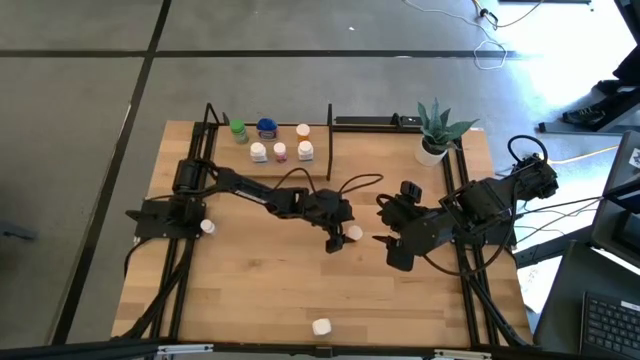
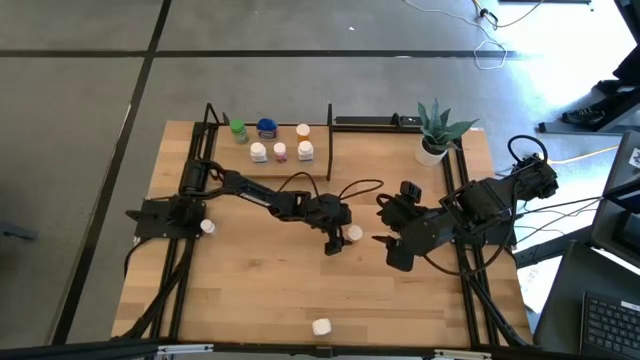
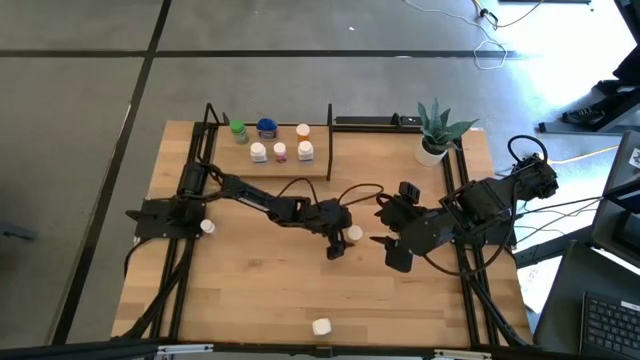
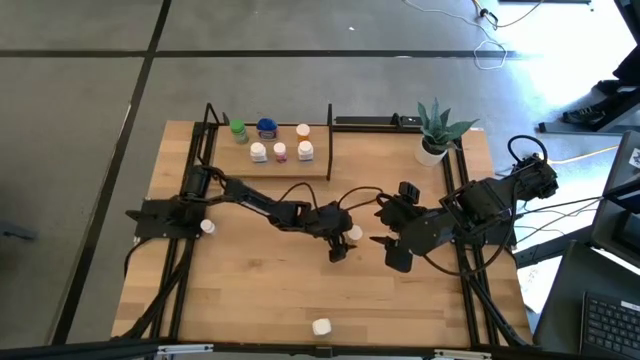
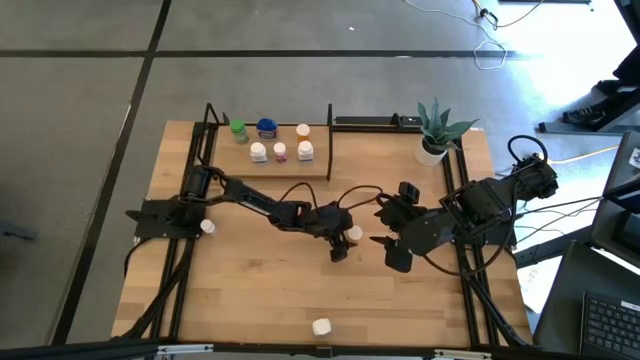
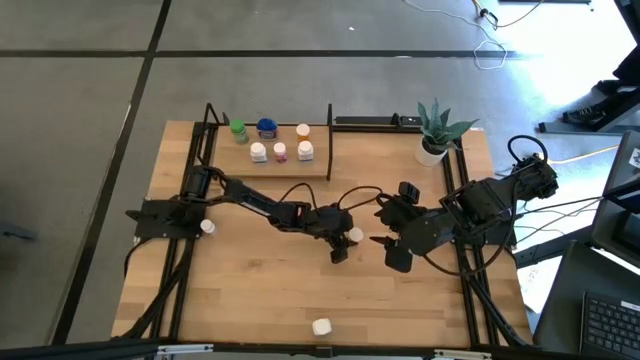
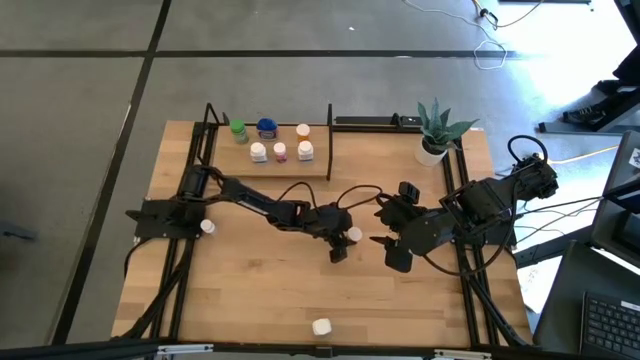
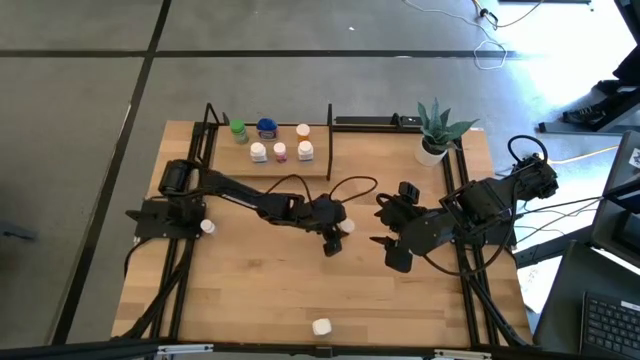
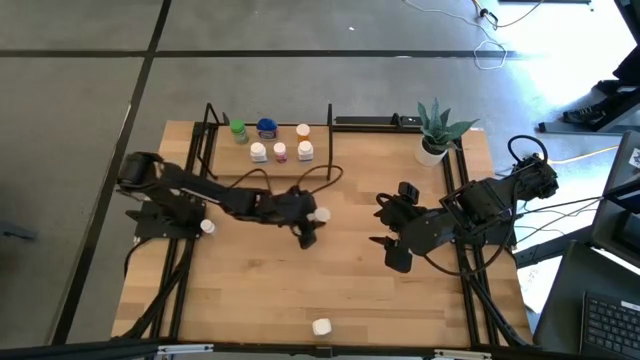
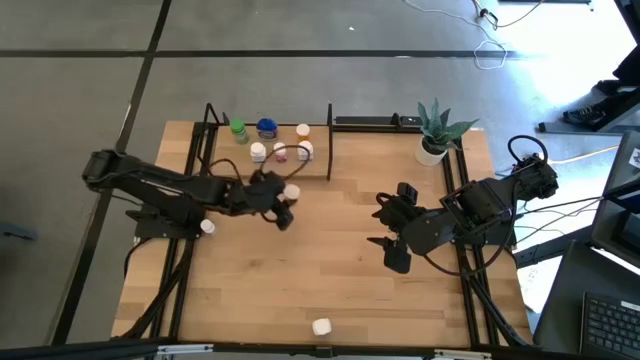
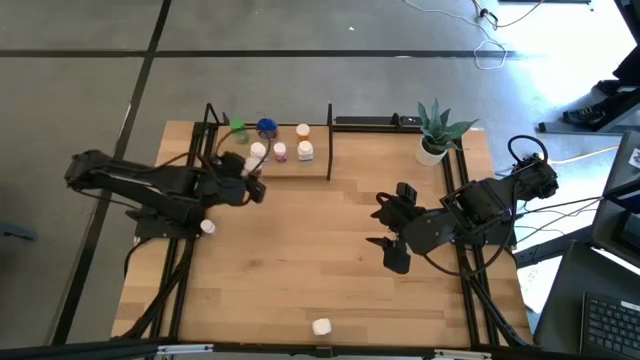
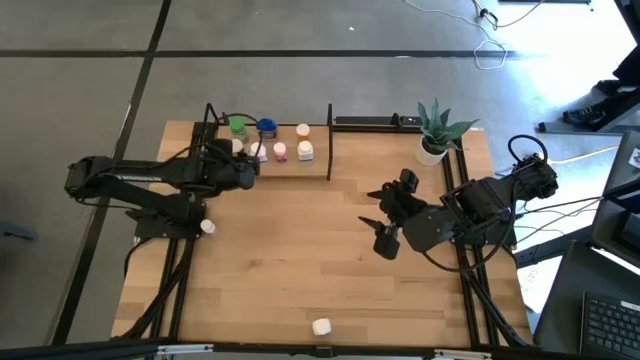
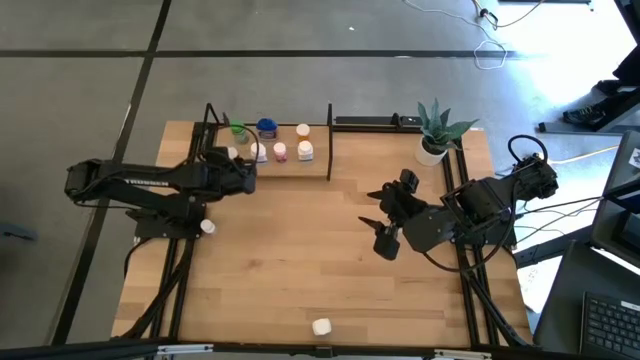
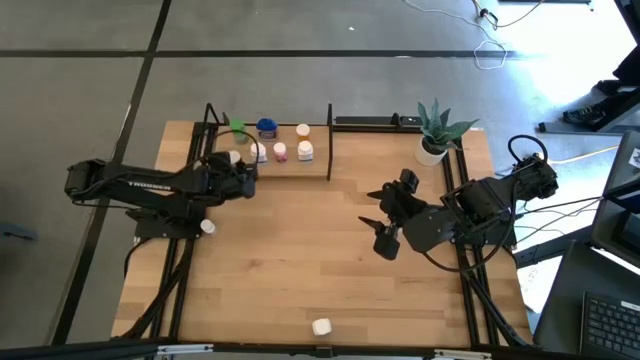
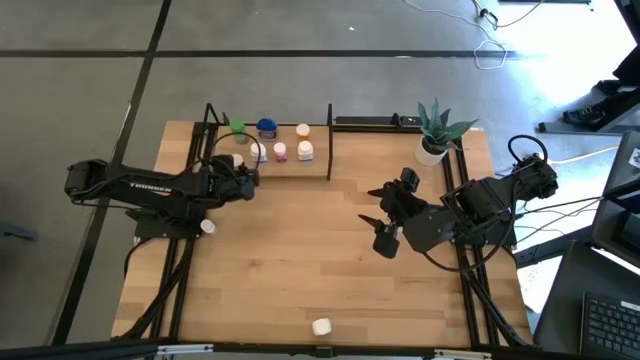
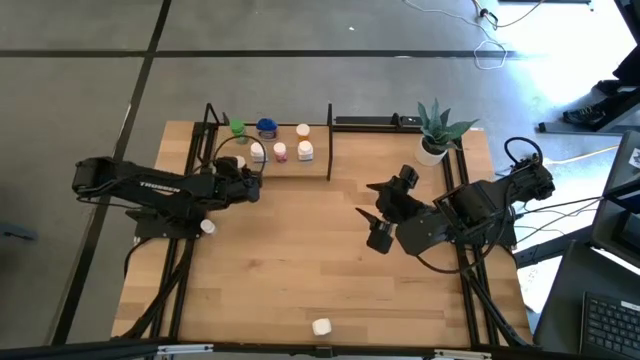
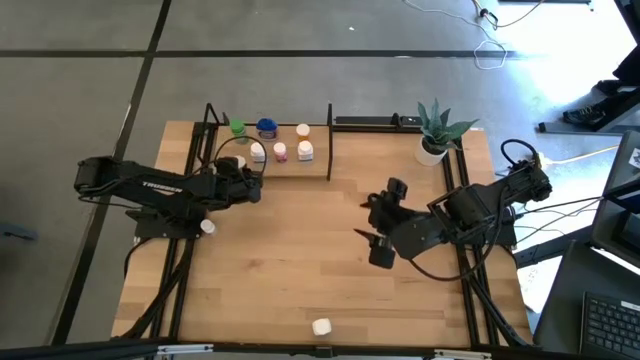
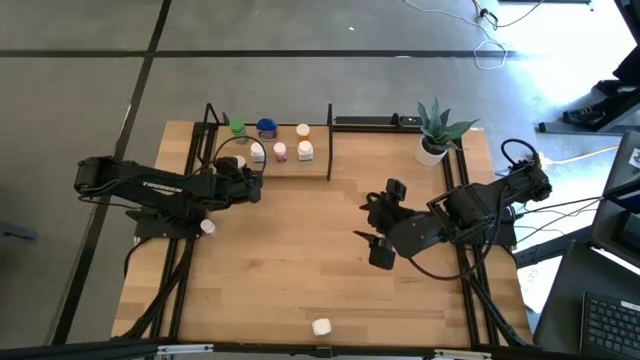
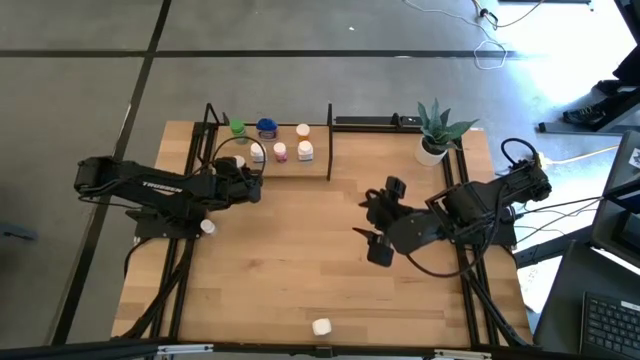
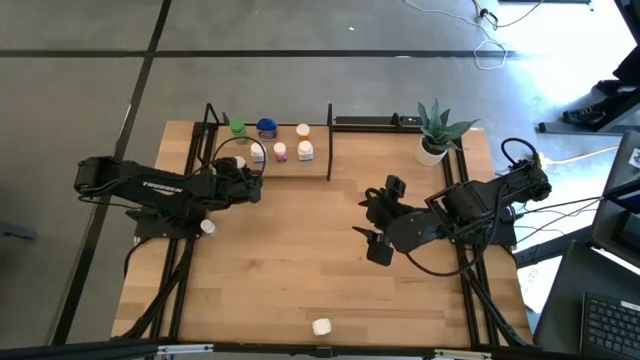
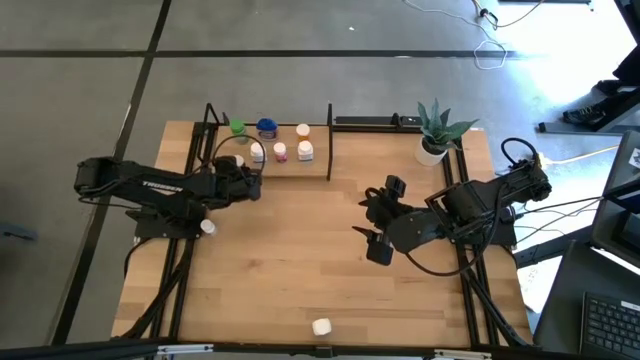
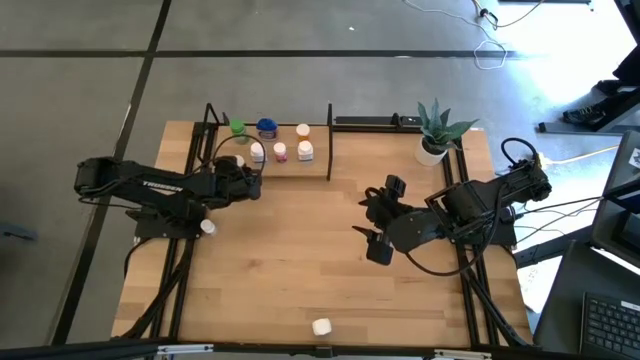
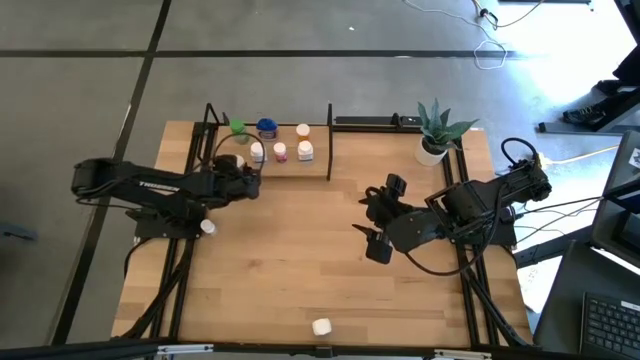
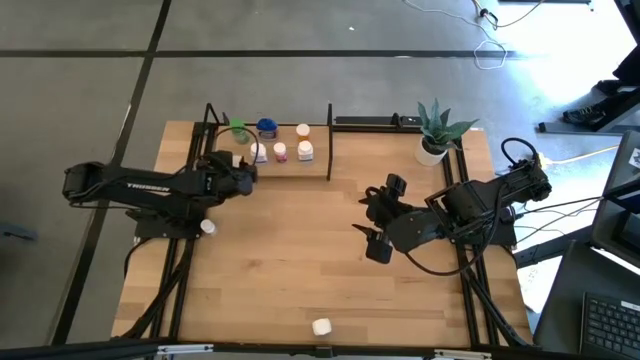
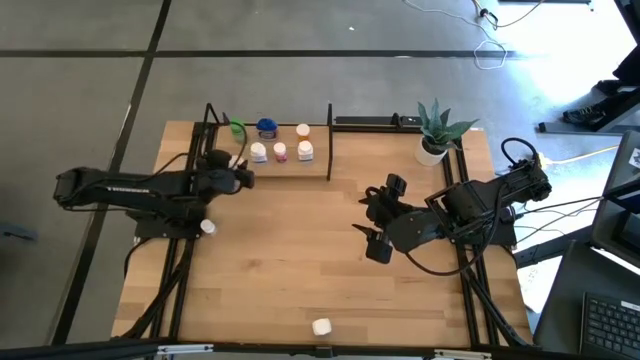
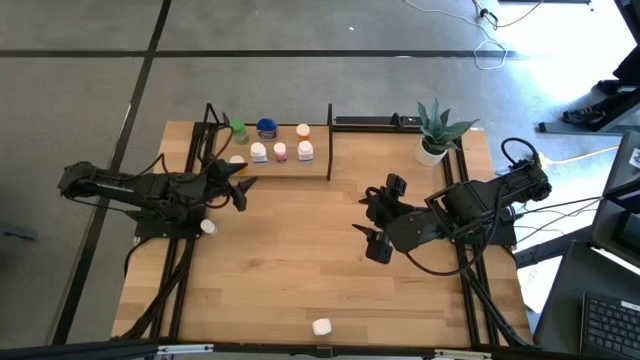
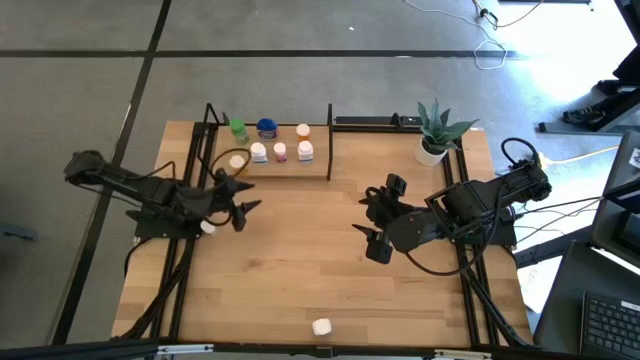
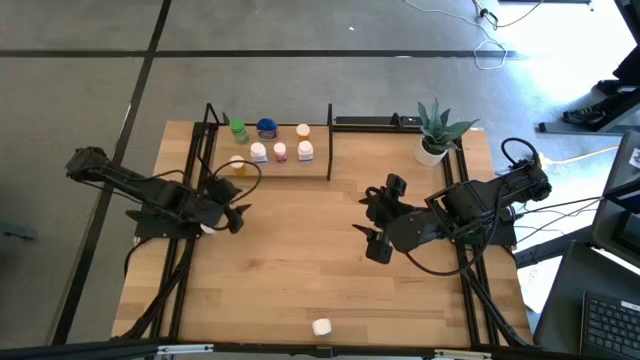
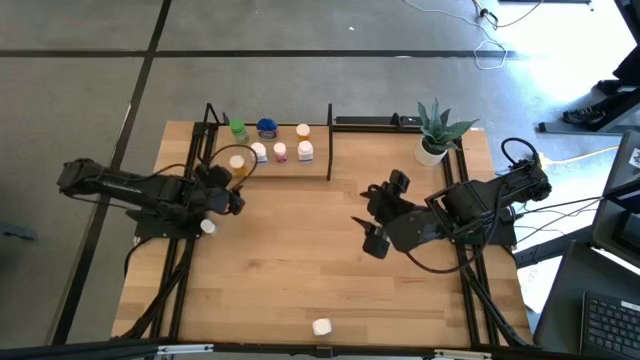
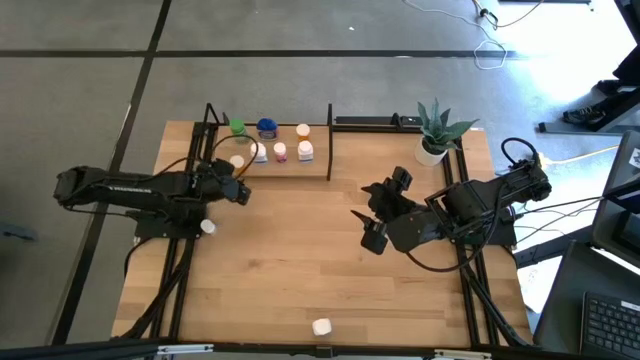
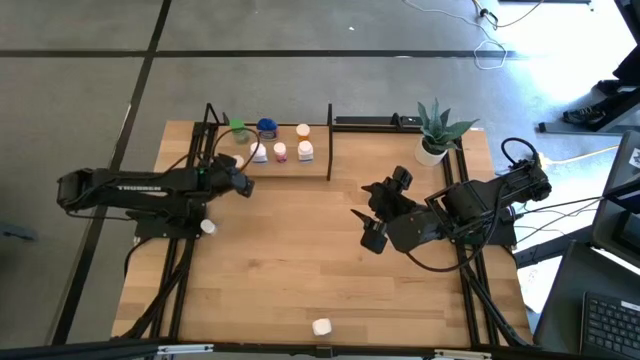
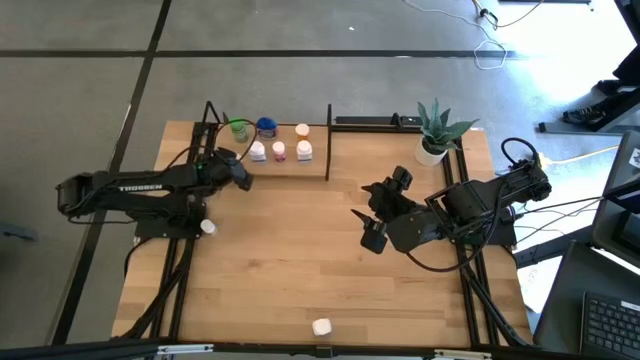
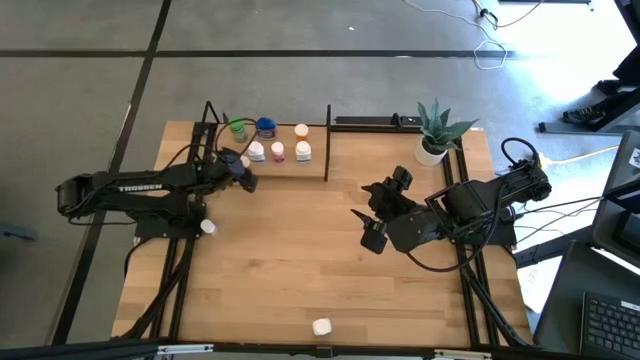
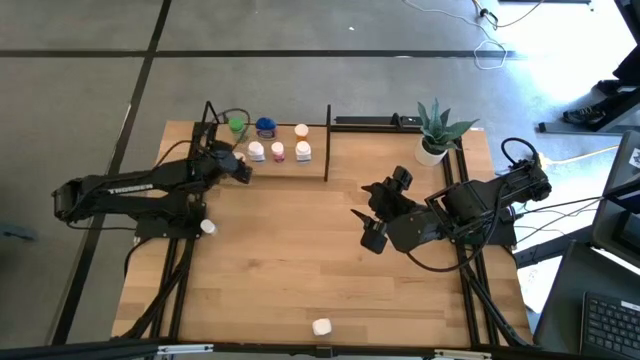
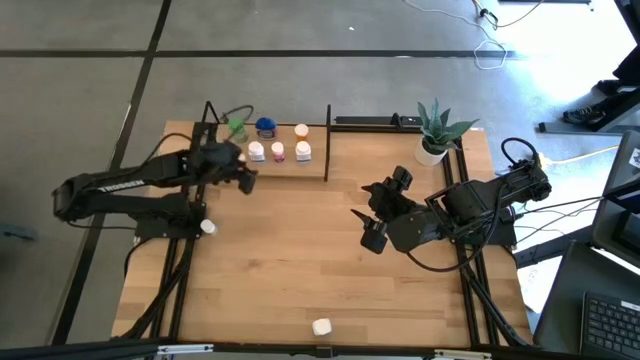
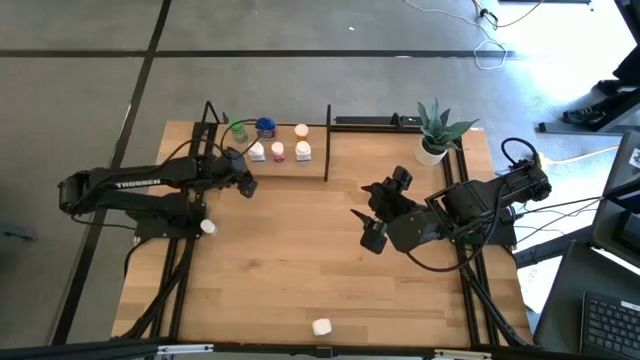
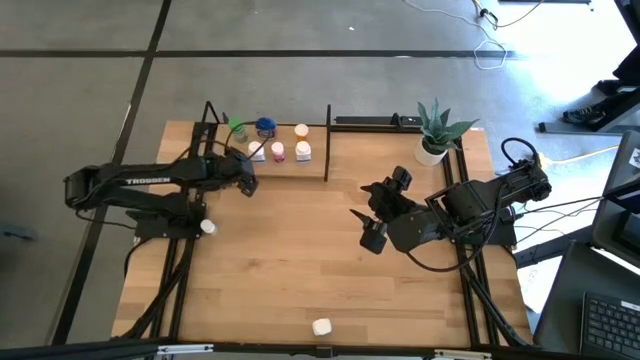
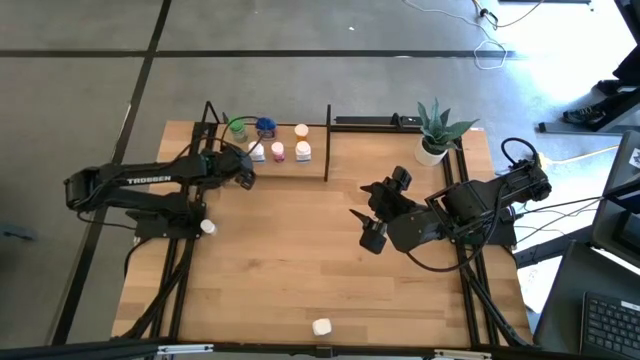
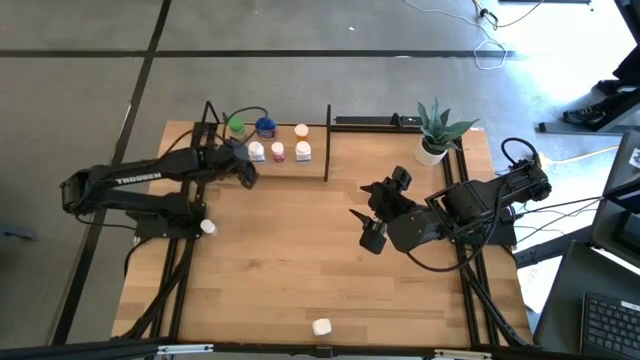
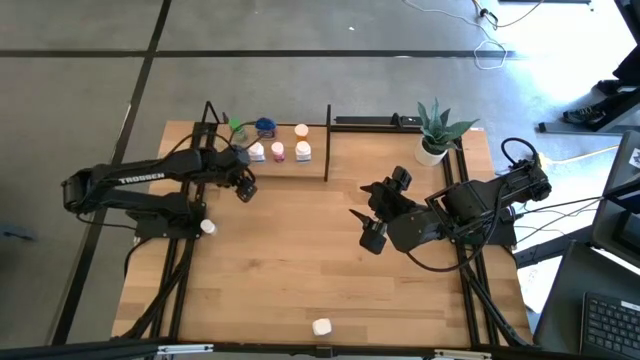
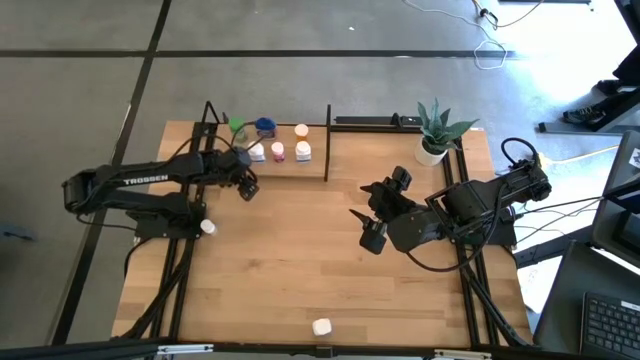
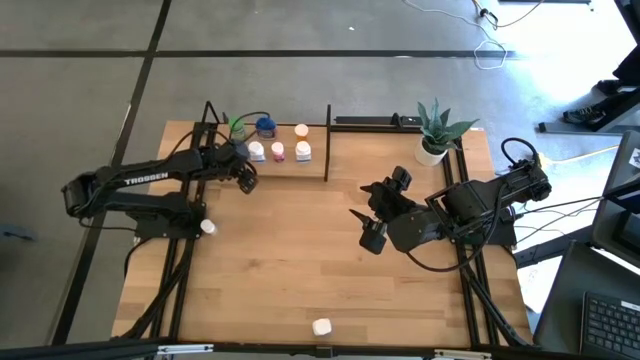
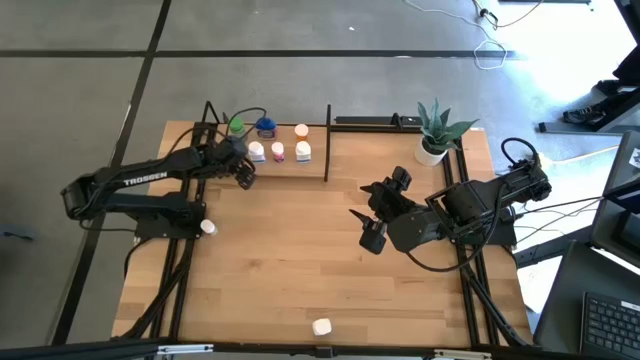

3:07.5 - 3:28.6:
Task: Pick and place medicine bottles onto shelf by color
Put the orange pill bottle on the shelf
